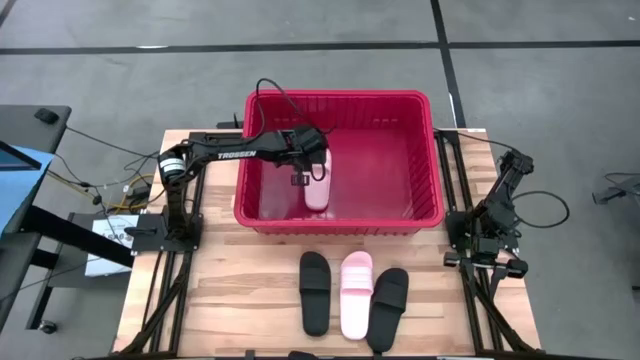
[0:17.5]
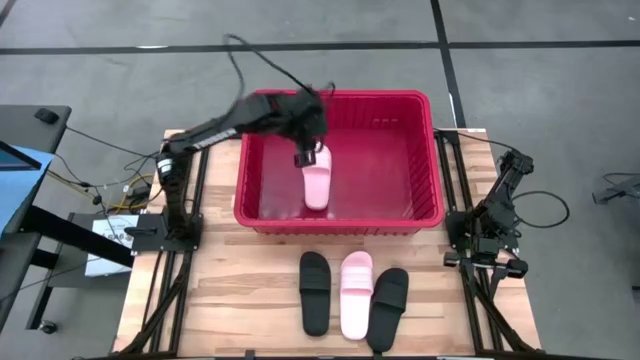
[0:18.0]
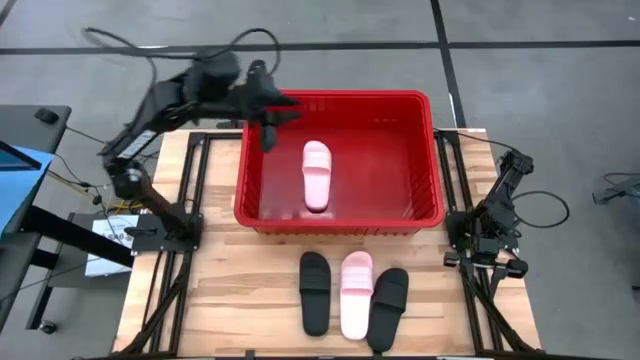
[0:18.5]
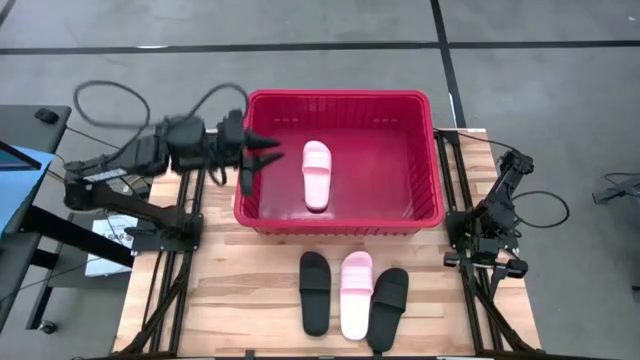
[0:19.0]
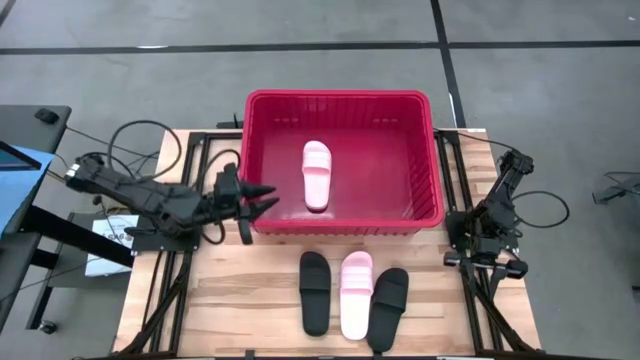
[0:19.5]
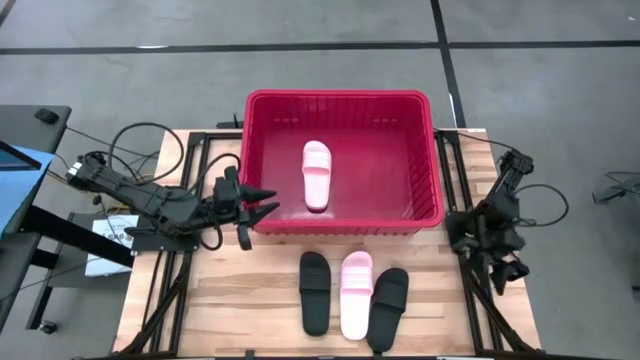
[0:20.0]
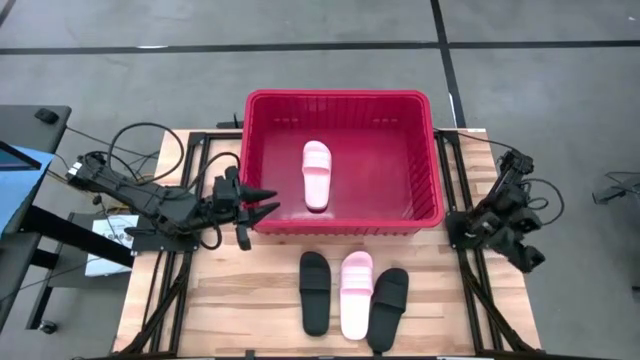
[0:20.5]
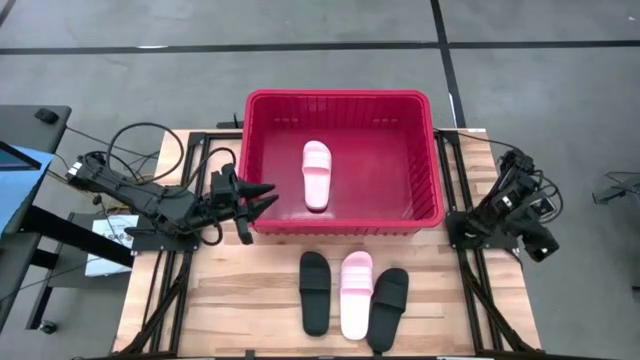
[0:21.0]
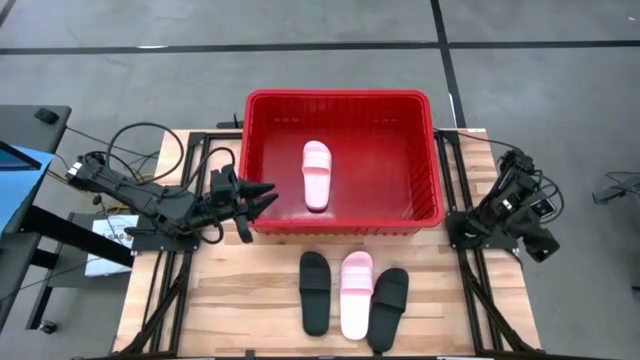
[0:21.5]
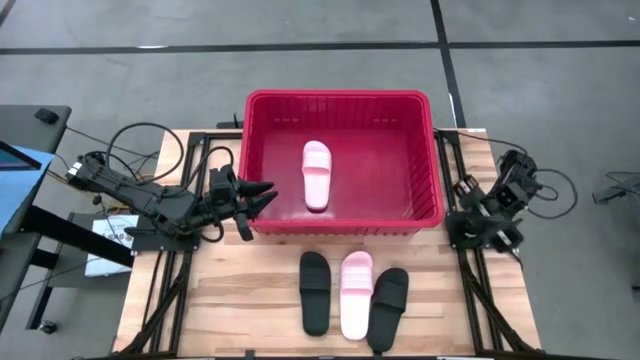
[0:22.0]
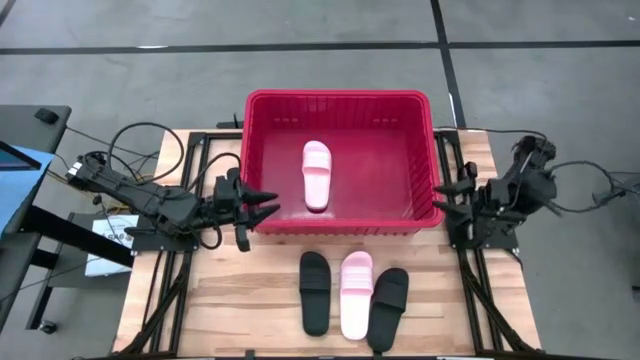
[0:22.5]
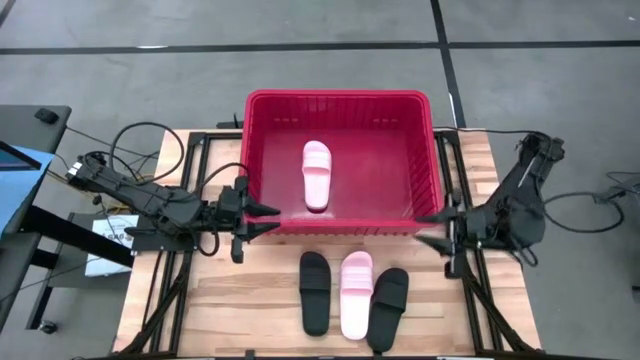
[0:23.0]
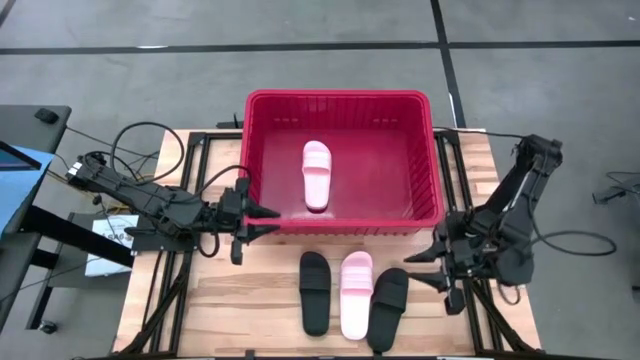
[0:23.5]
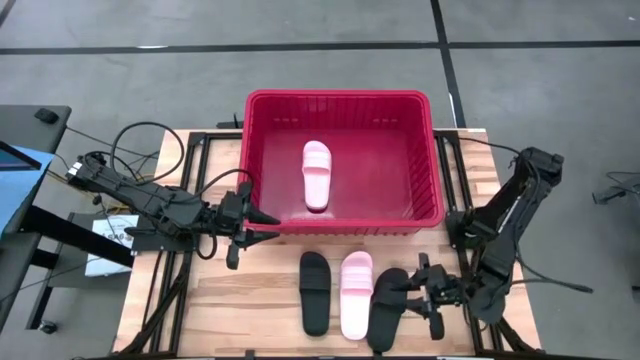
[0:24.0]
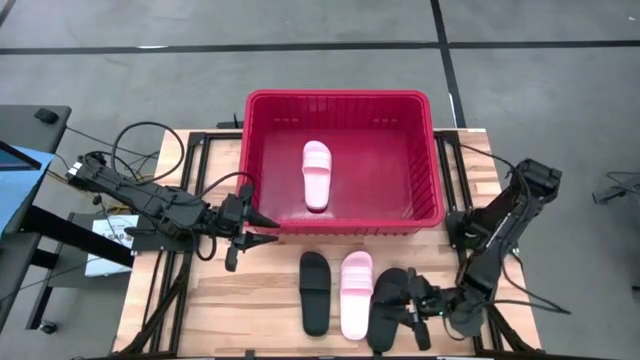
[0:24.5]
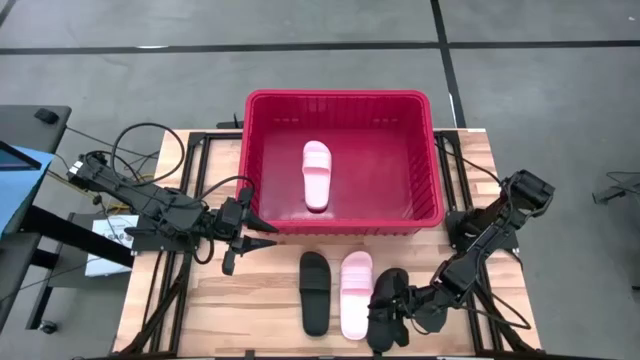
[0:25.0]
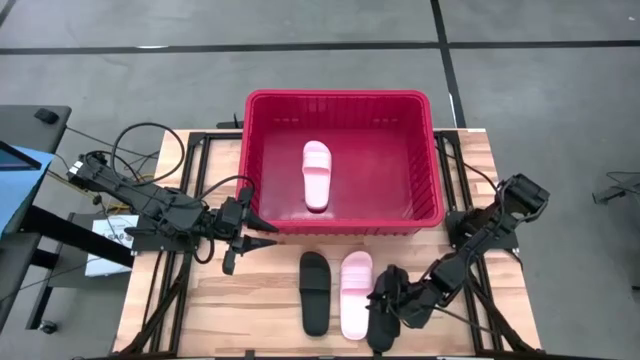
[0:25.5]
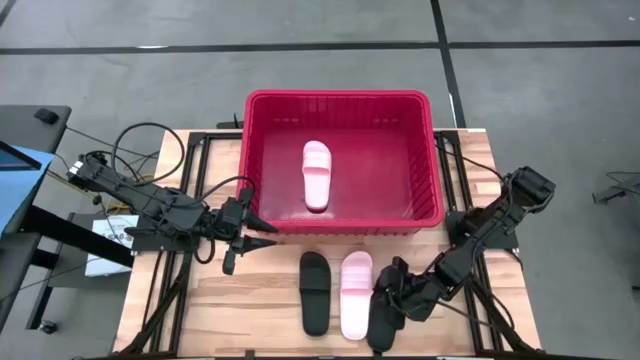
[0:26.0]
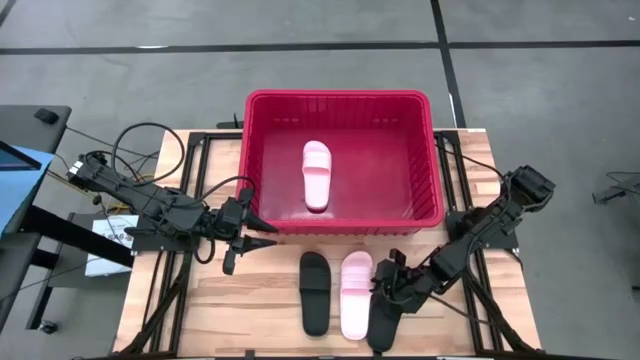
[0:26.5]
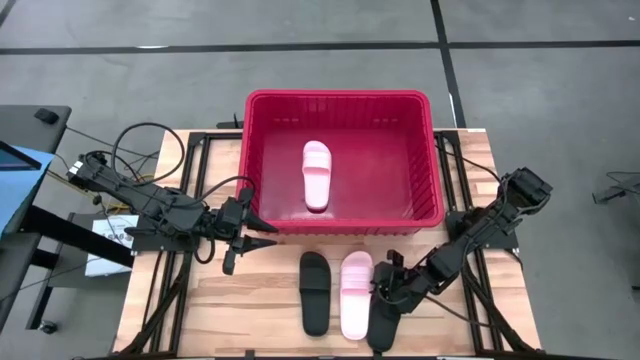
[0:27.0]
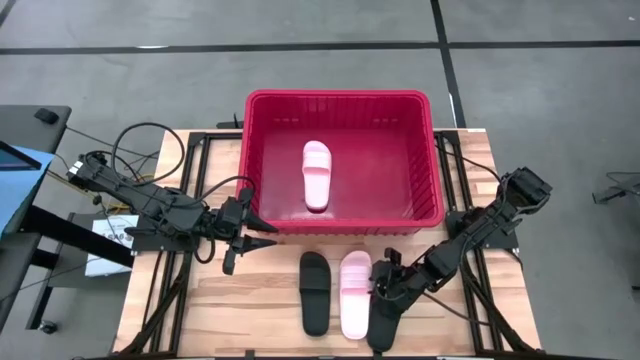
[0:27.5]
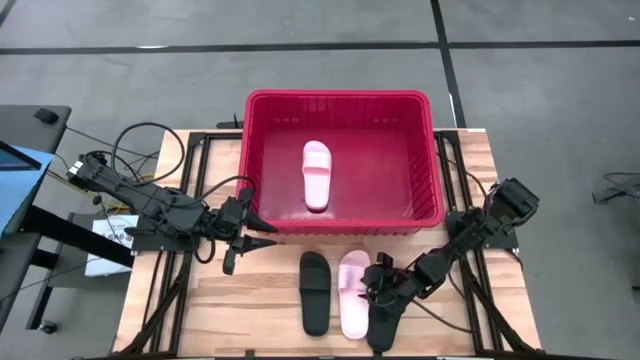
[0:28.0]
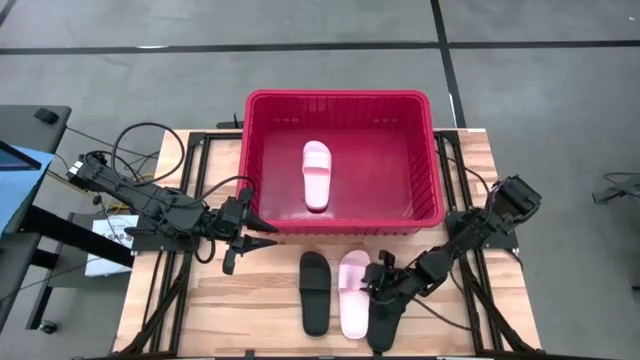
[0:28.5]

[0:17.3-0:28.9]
Task: Pick and place slides into bin
Put the pink slide into the red bin

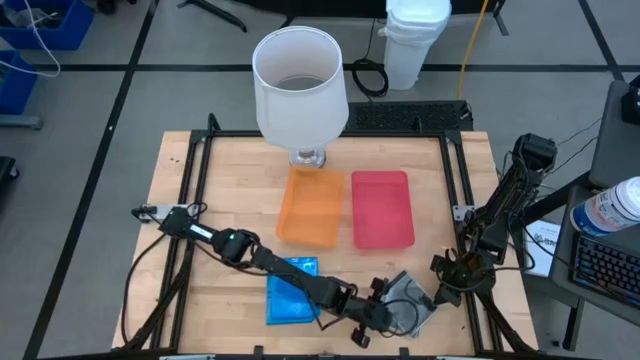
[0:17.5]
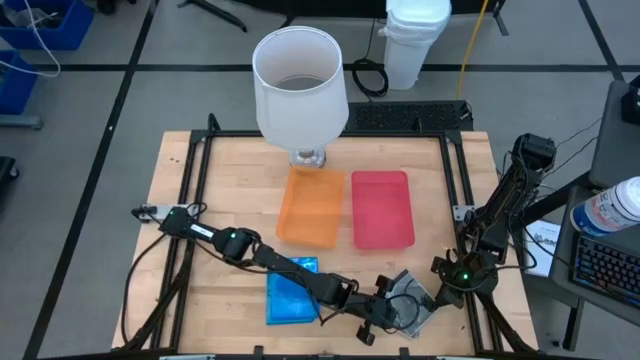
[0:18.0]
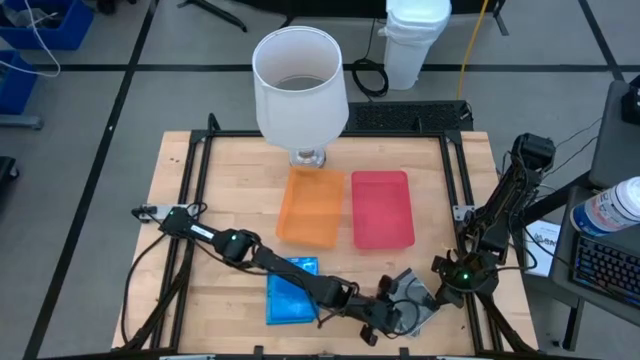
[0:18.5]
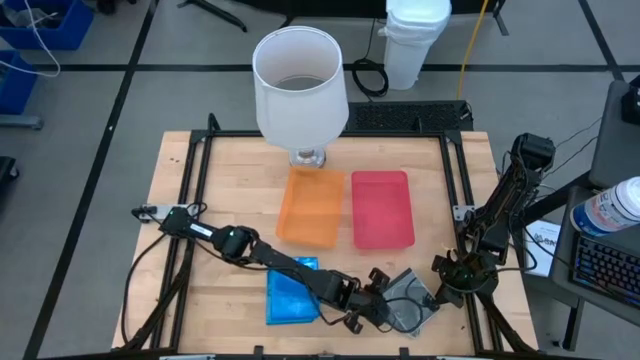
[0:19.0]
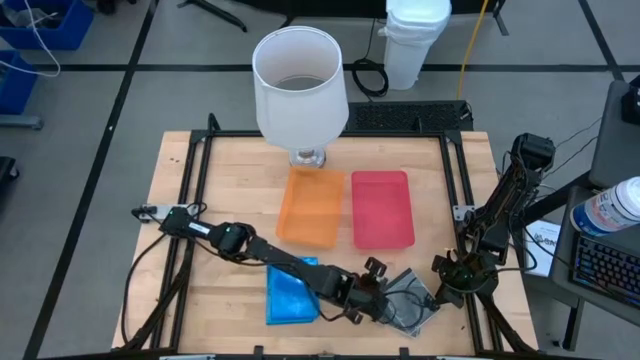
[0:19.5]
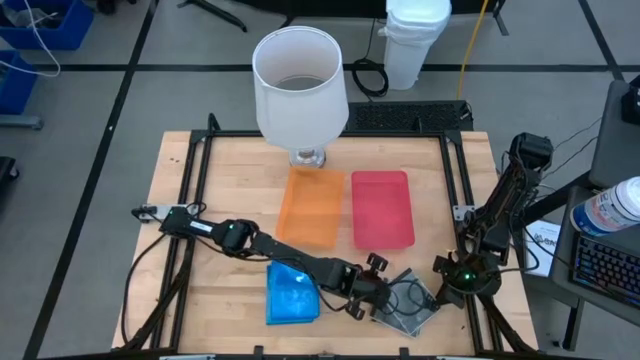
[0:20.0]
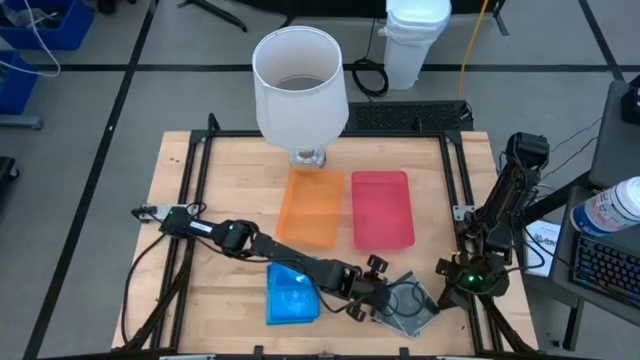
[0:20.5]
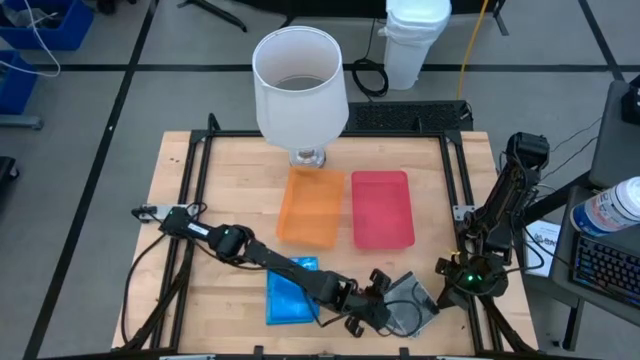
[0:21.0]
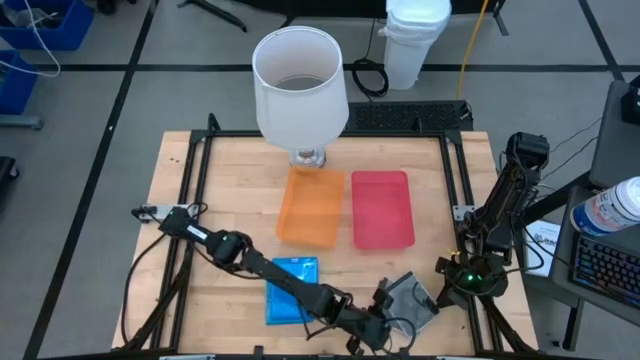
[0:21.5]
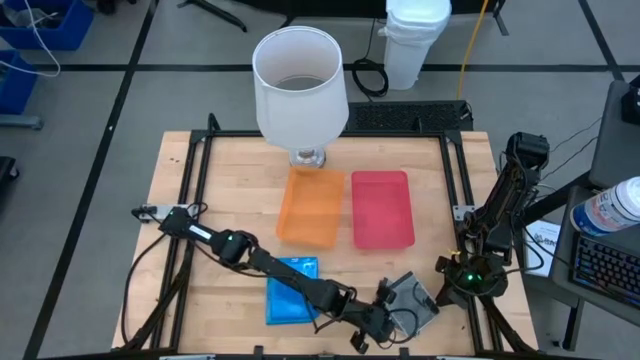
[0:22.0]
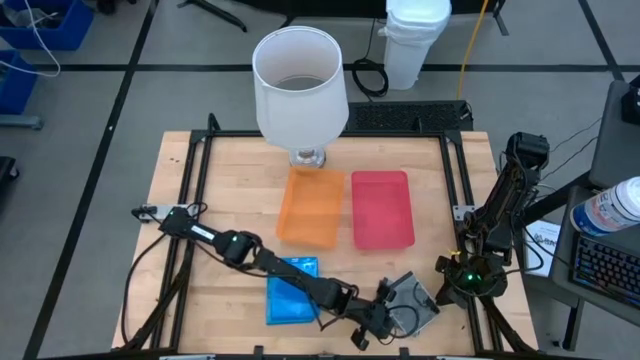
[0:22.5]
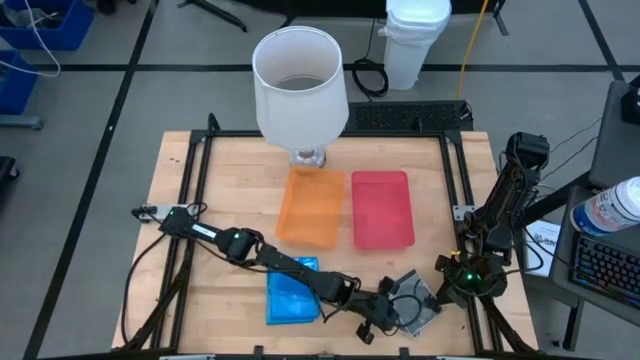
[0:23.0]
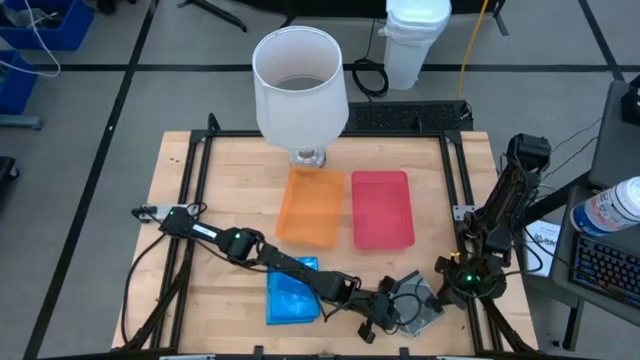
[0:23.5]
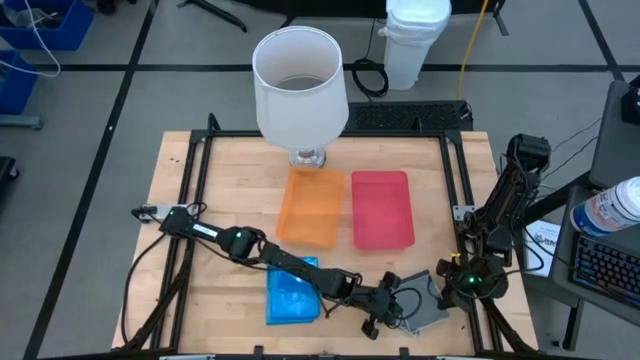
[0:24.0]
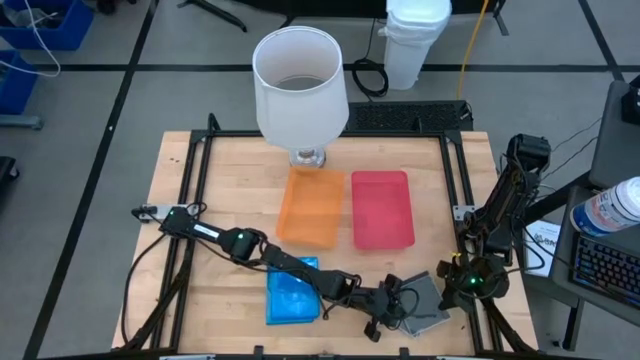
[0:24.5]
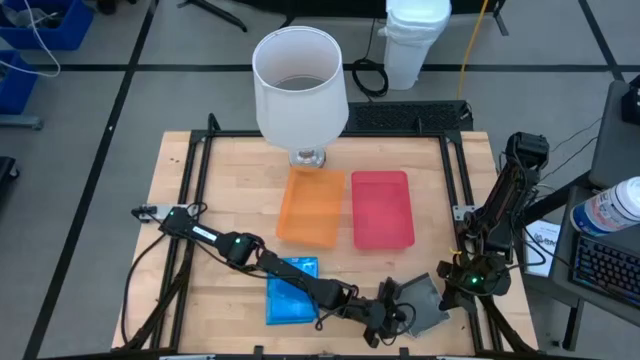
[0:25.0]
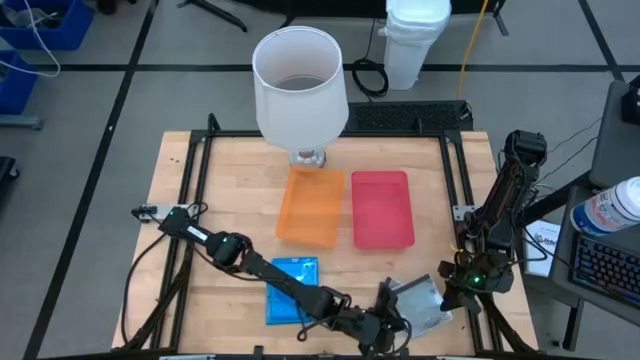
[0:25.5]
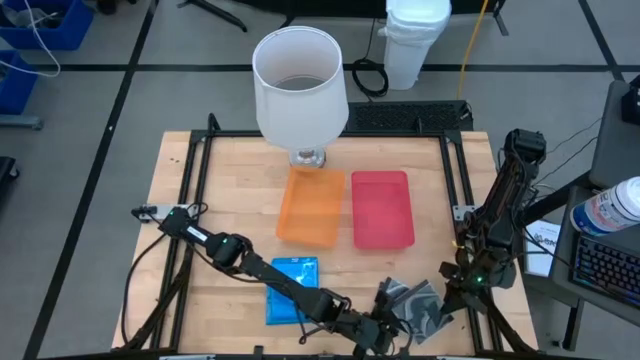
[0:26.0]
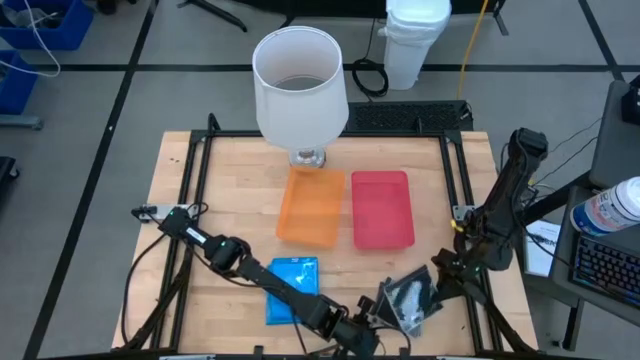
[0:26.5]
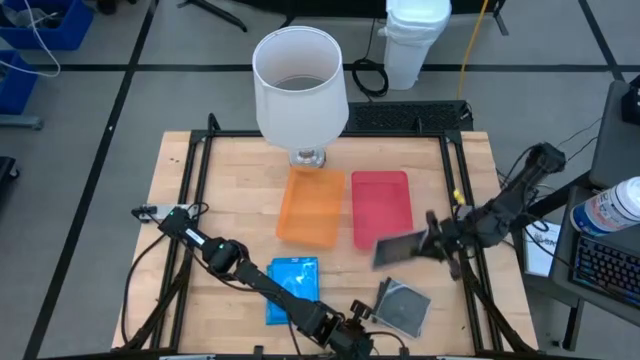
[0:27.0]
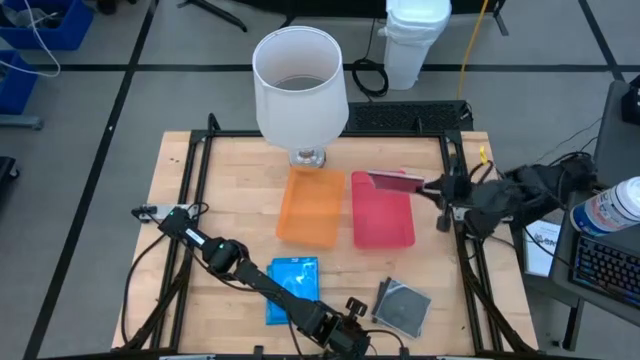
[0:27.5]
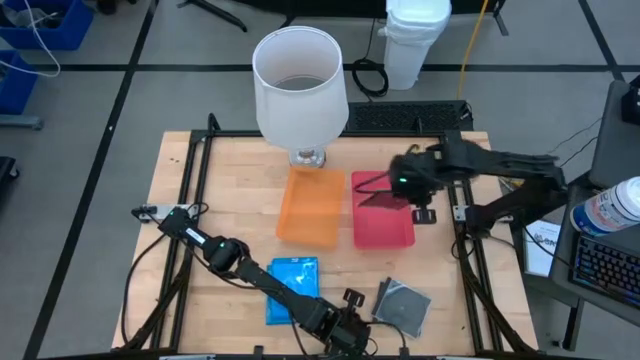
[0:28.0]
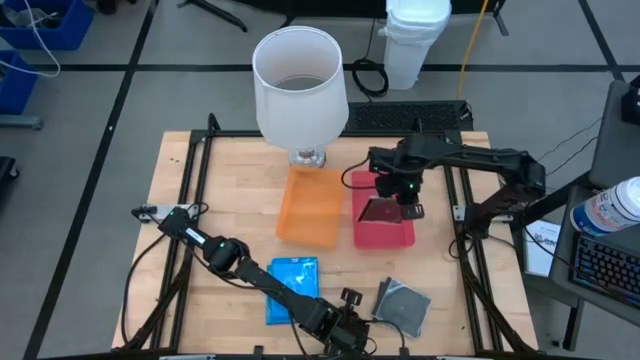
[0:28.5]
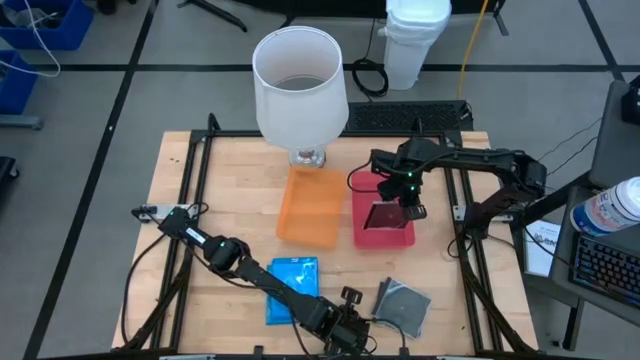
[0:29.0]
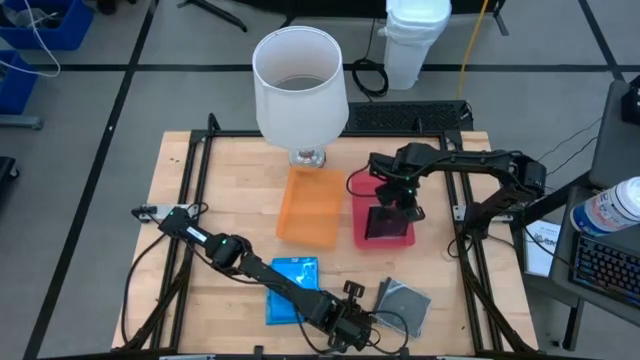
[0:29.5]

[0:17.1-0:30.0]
Task: Pick & place jewel cases by type
Put the black CD case into the red bin
